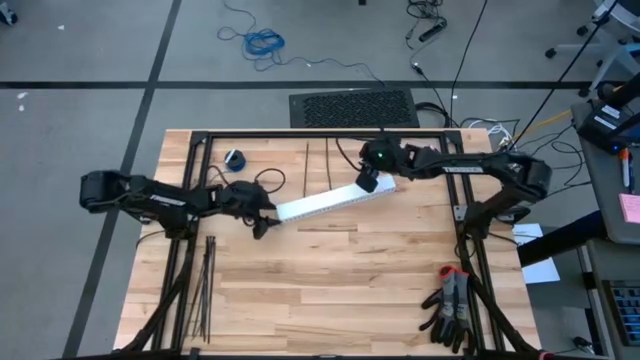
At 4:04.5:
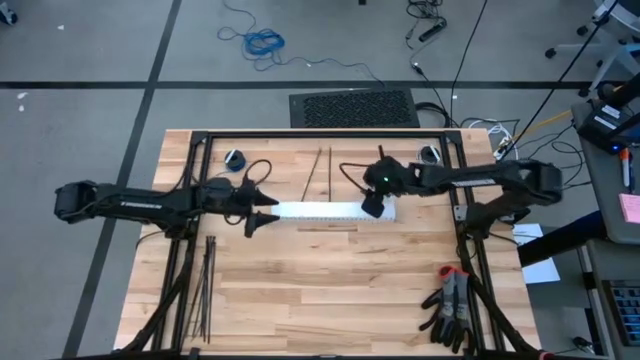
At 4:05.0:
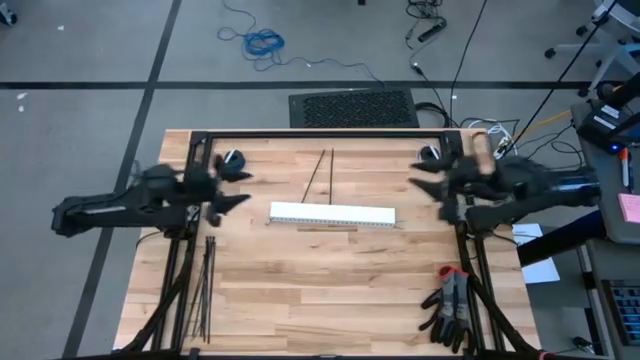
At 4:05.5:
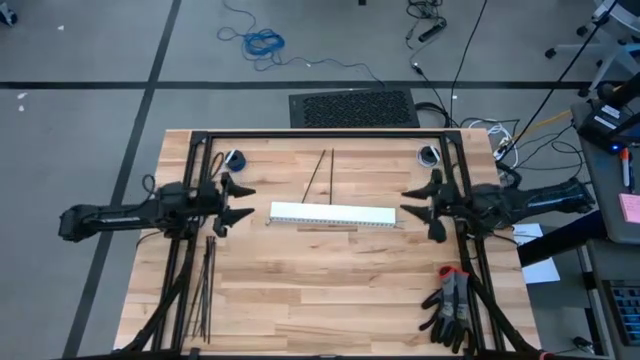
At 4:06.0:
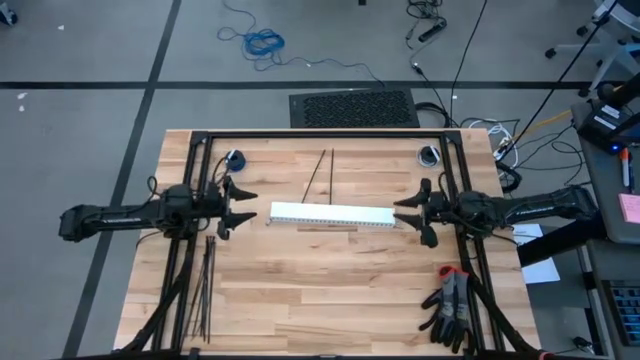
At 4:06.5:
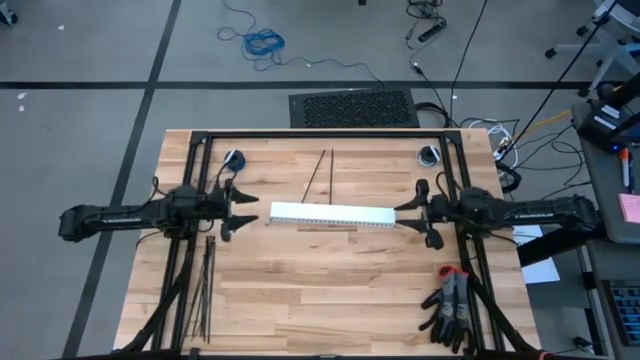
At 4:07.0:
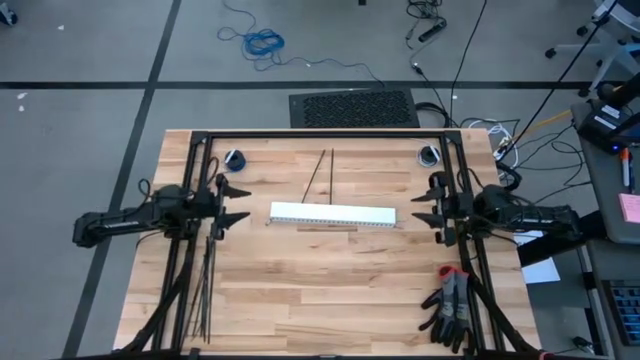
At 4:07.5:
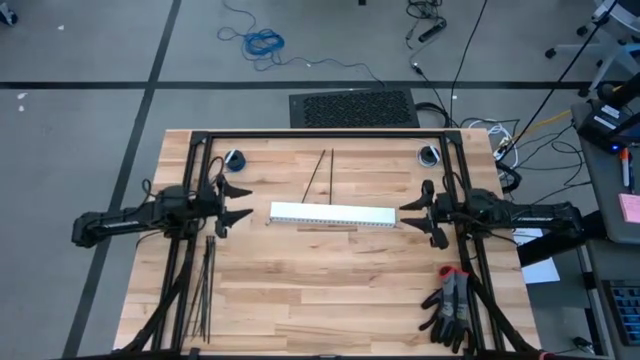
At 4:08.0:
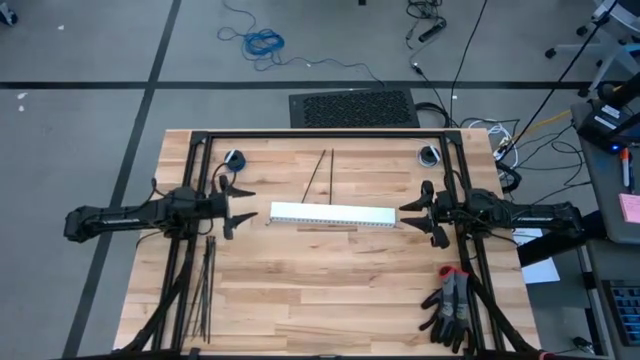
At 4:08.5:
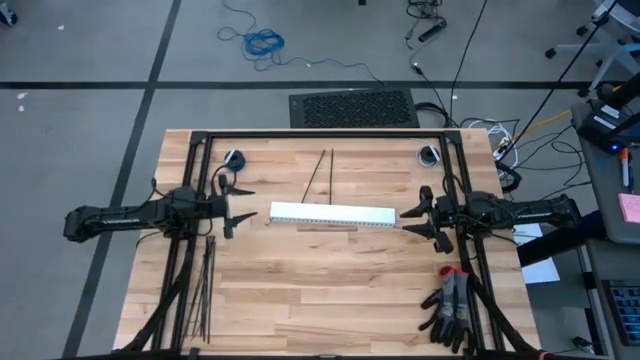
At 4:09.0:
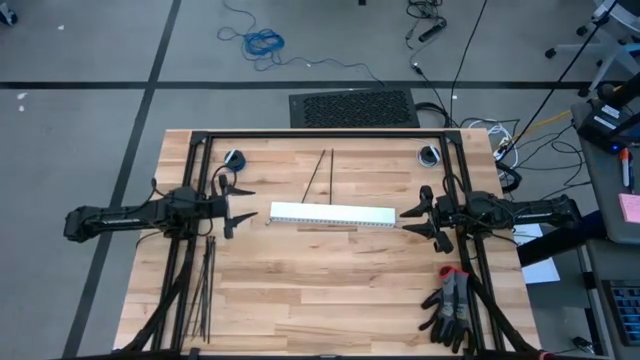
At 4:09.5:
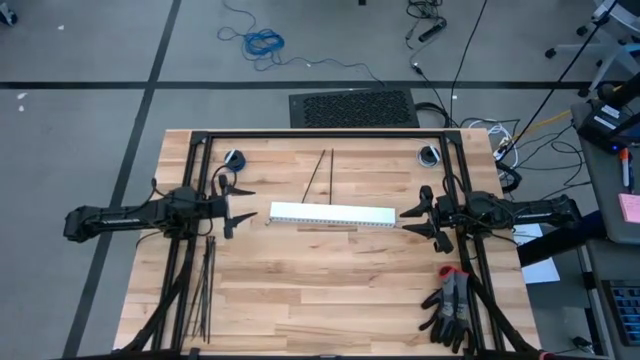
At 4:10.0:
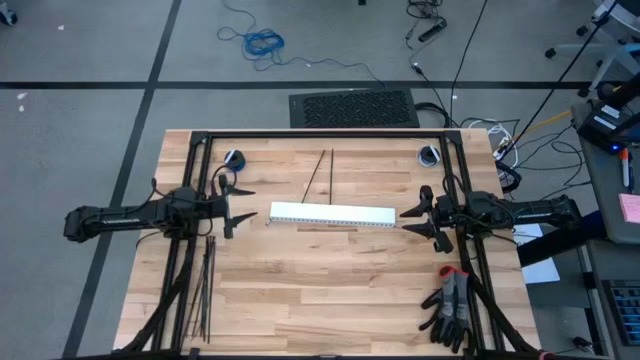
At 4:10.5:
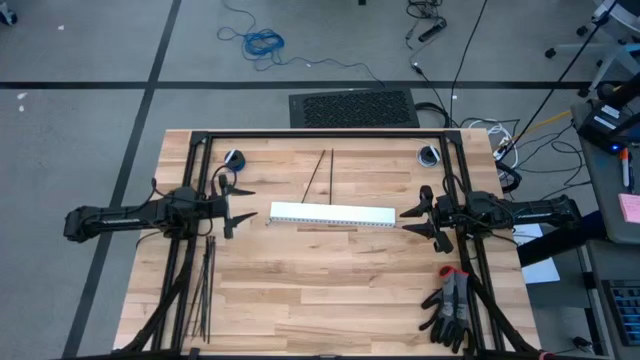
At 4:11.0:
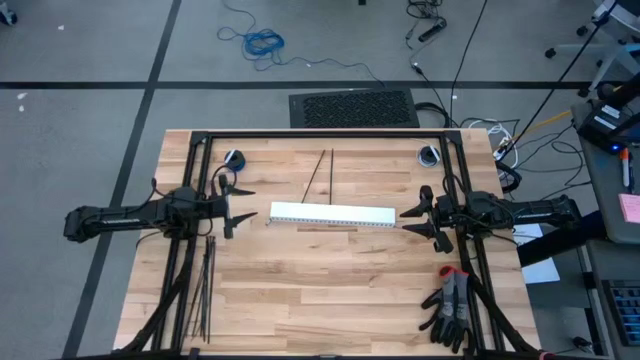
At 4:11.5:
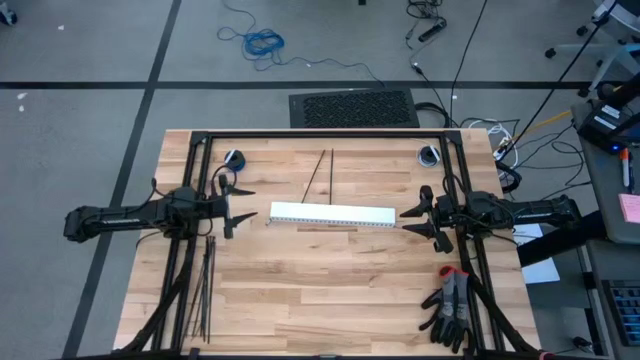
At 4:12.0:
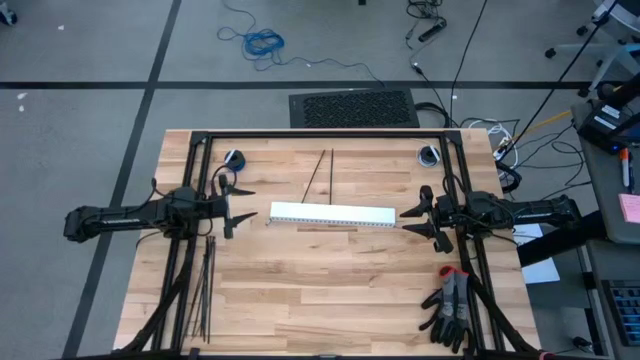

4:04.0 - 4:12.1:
Task: Ziptie cables
Return to Home Position

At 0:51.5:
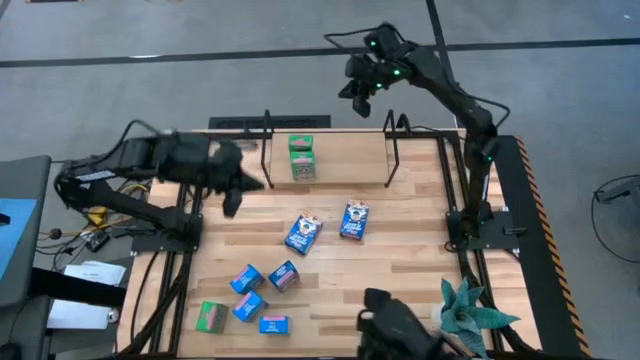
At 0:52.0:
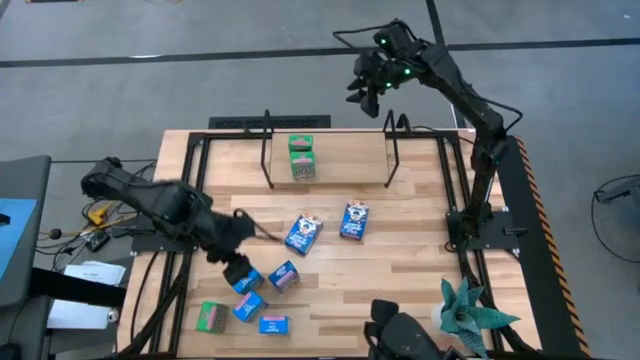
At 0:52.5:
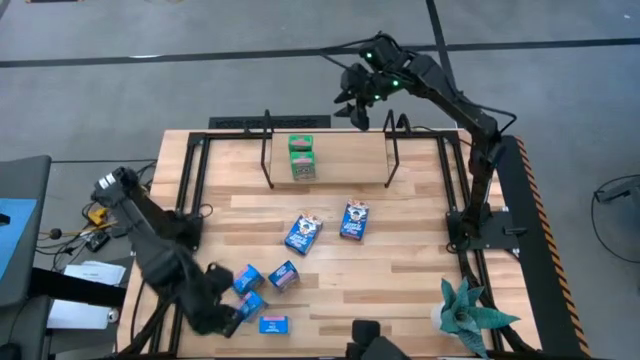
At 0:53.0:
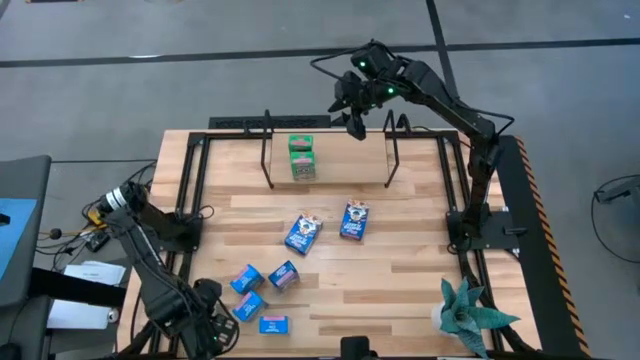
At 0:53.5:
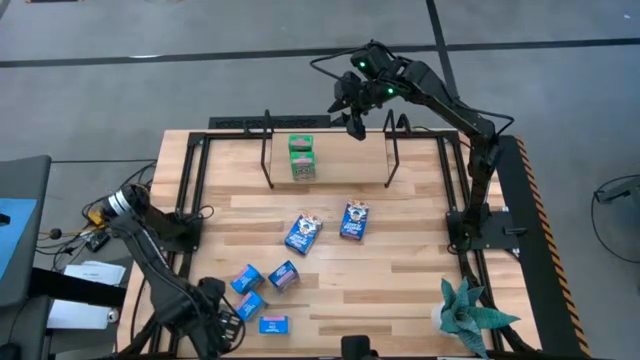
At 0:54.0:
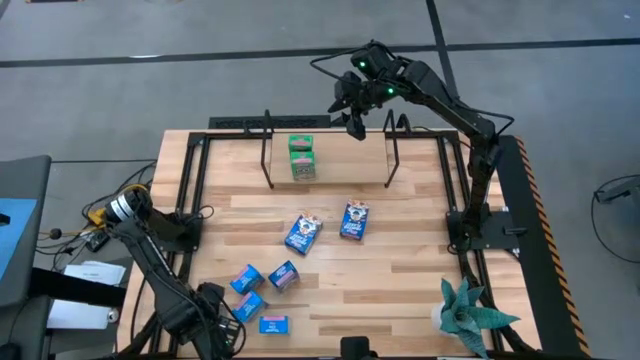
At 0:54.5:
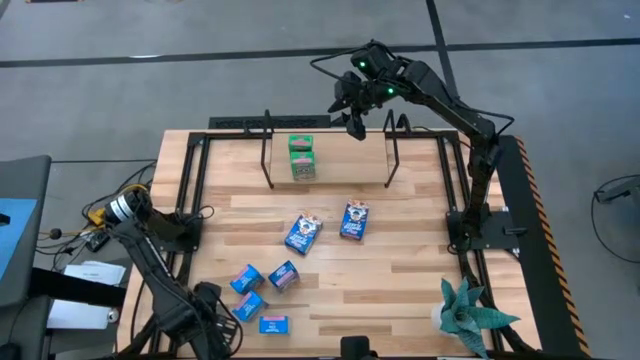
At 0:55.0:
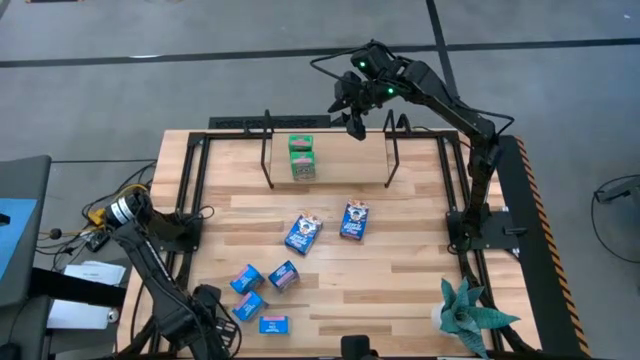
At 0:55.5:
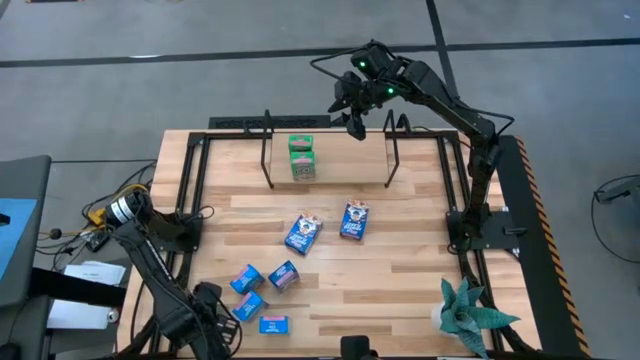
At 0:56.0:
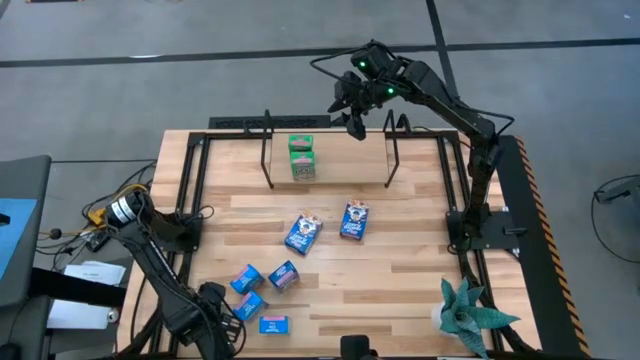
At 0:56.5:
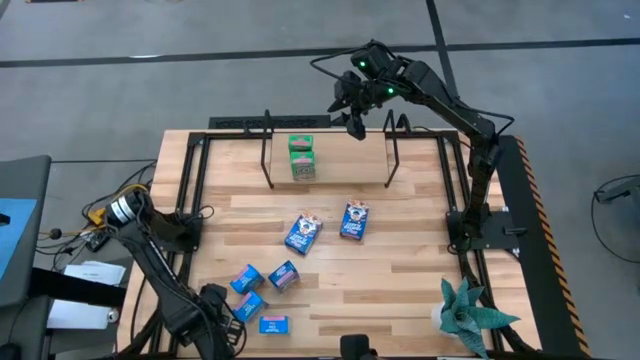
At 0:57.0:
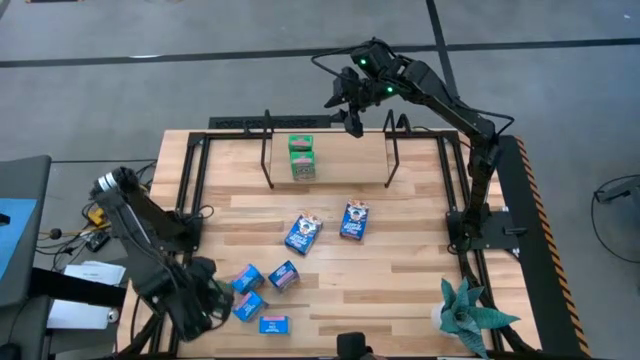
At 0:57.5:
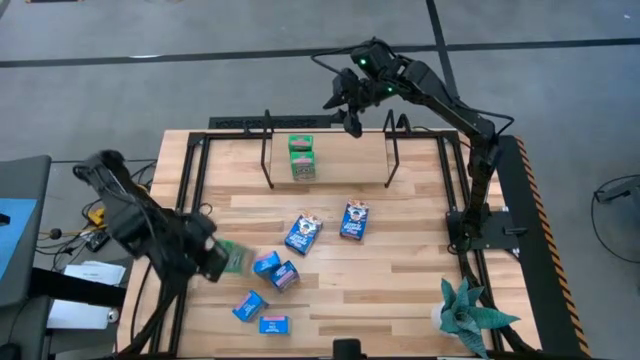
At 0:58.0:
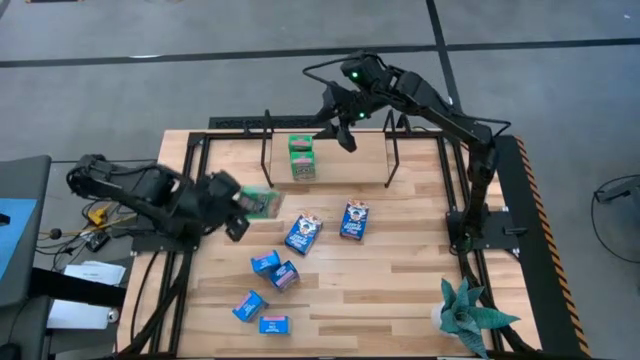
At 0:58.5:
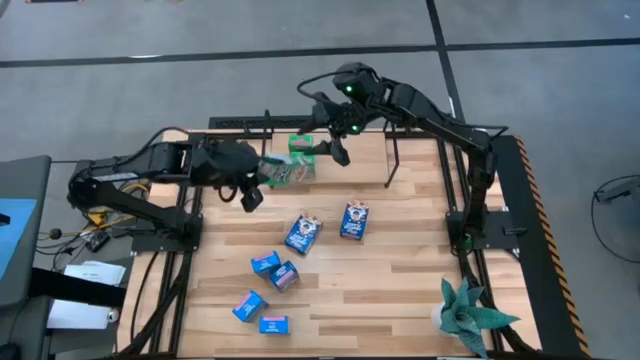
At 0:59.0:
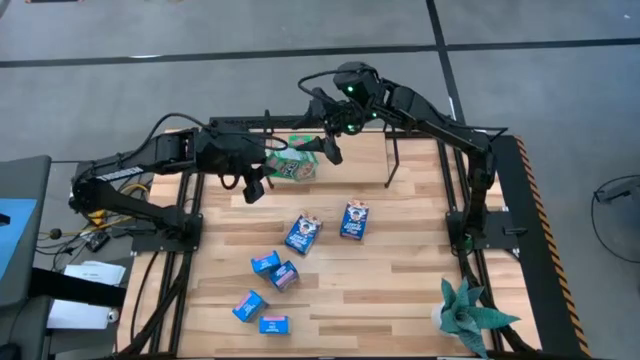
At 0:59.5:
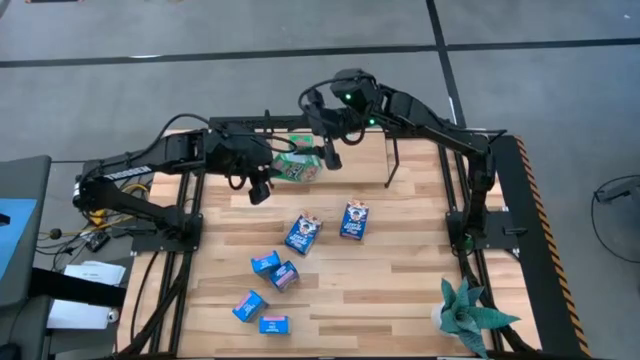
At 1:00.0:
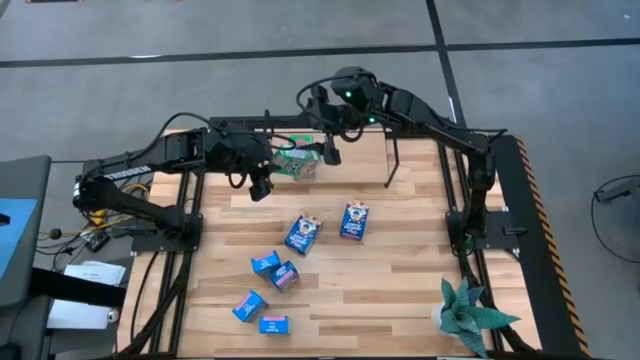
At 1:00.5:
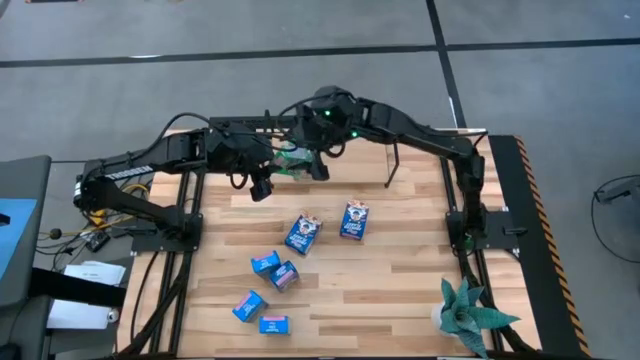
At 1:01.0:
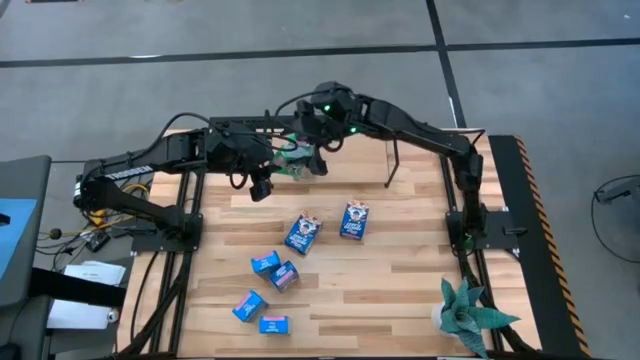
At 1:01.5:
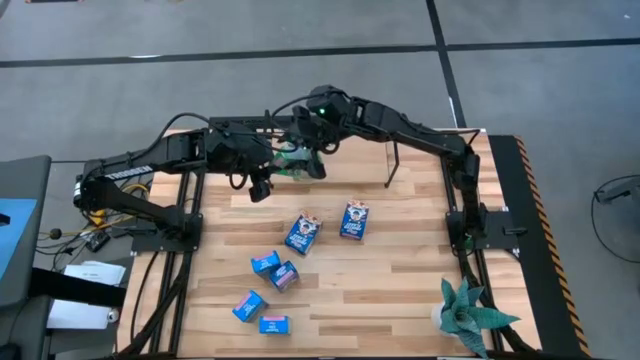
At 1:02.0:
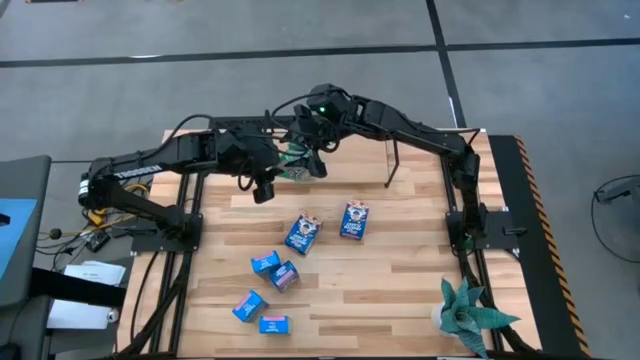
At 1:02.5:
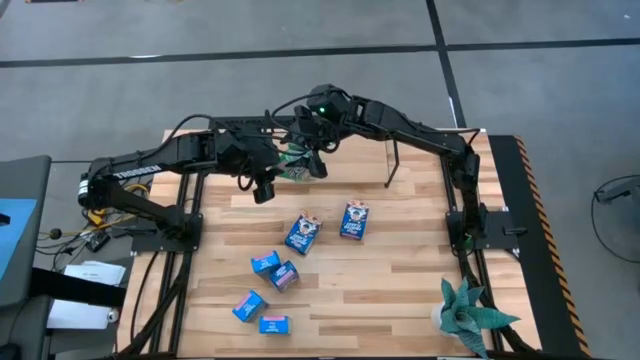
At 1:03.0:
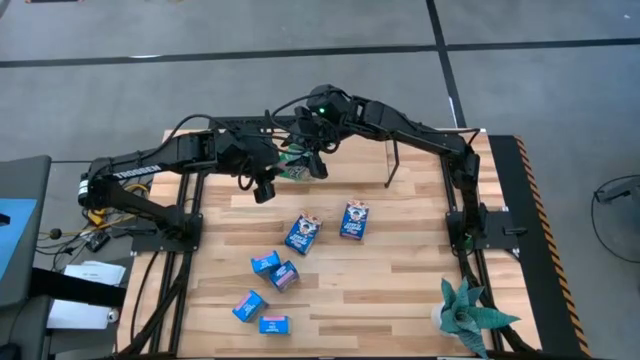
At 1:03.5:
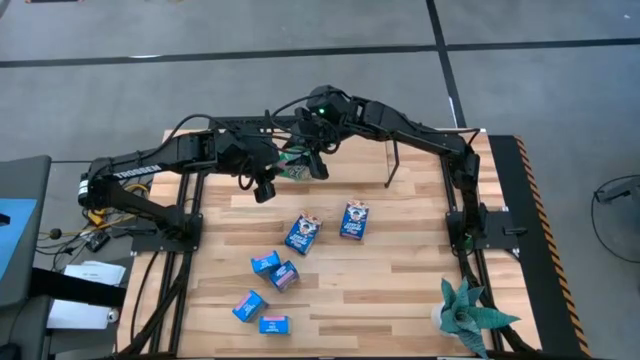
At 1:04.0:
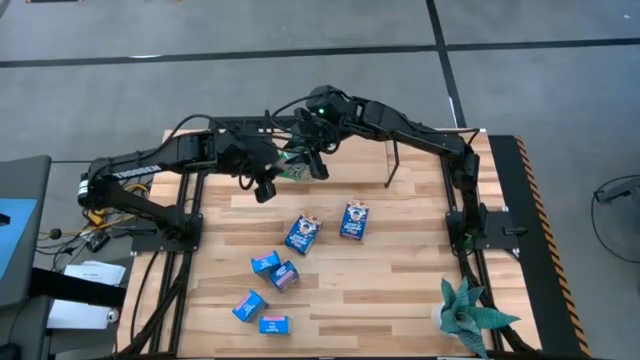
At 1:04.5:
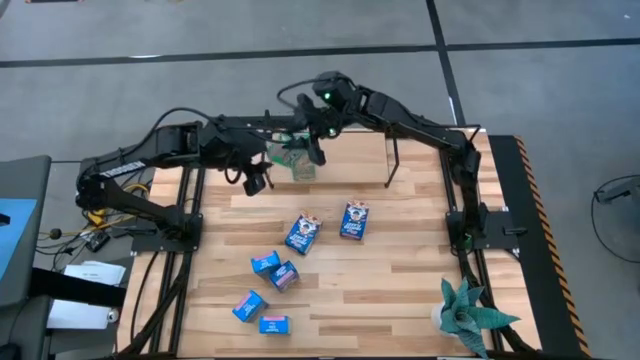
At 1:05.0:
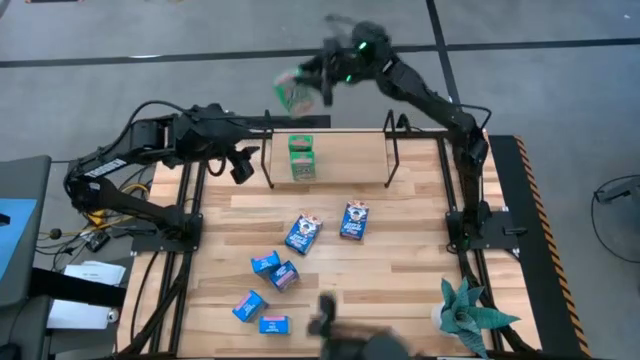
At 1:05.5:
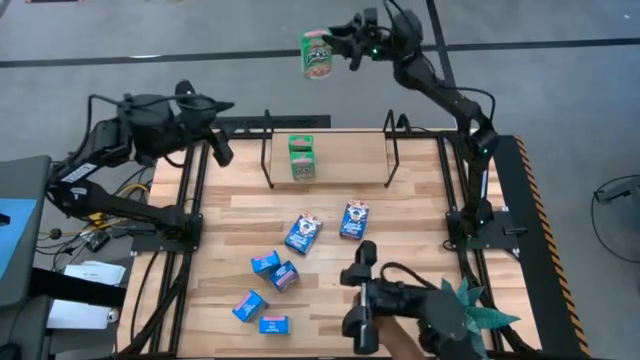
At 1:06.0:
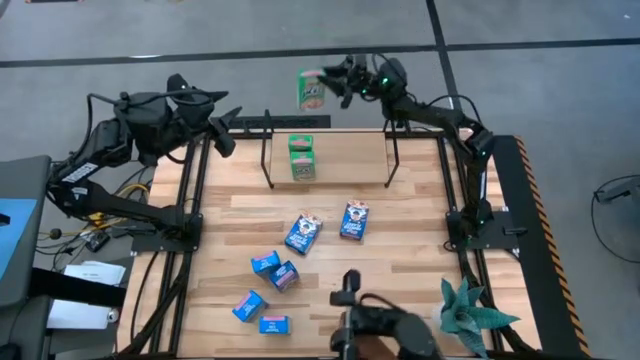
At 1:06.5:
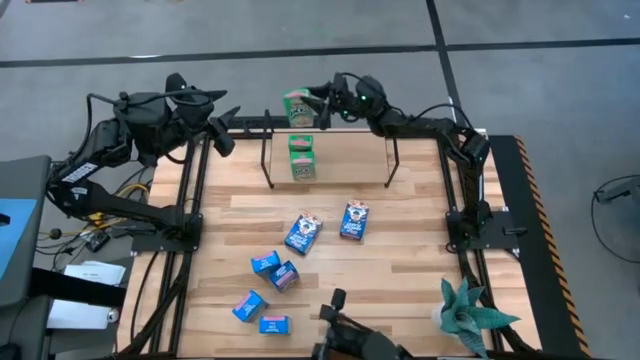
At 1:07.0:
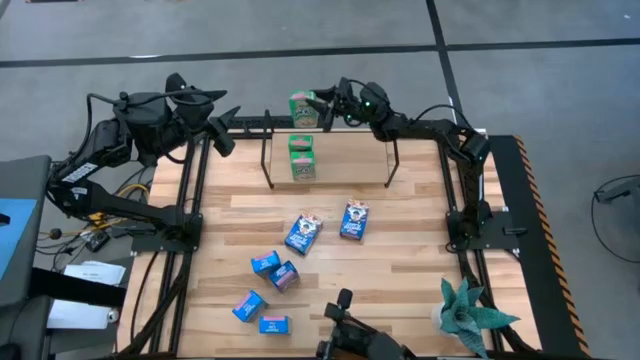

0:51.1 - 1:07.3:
Task: Stack cereal on shelf
Put the green cereal box on the shelf aligned with the other green cereal box
